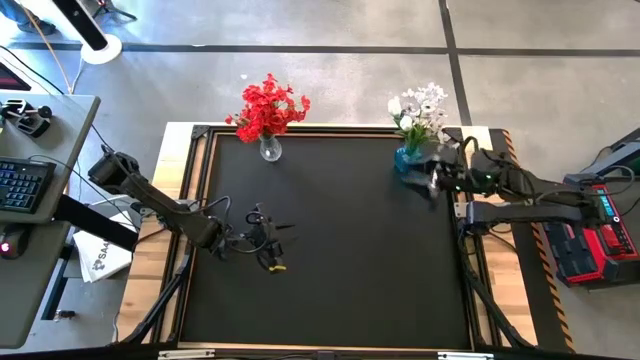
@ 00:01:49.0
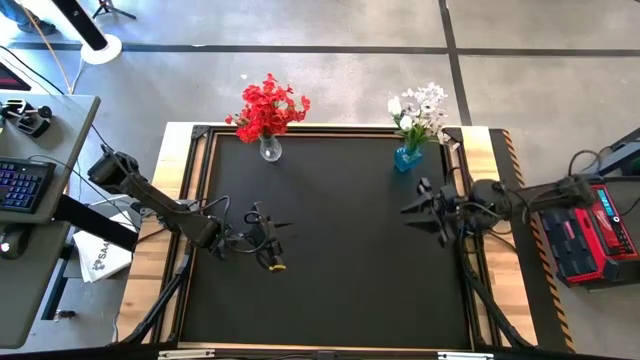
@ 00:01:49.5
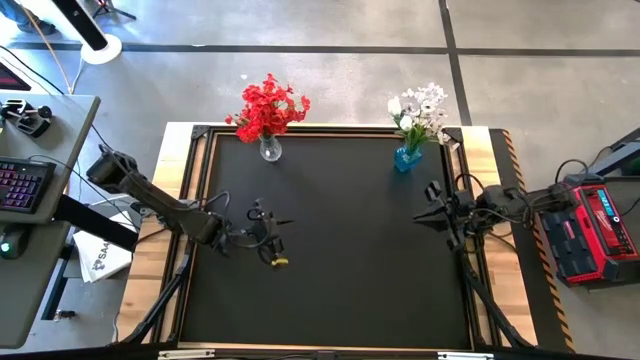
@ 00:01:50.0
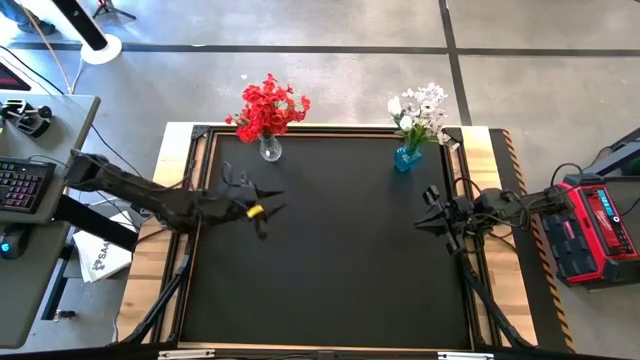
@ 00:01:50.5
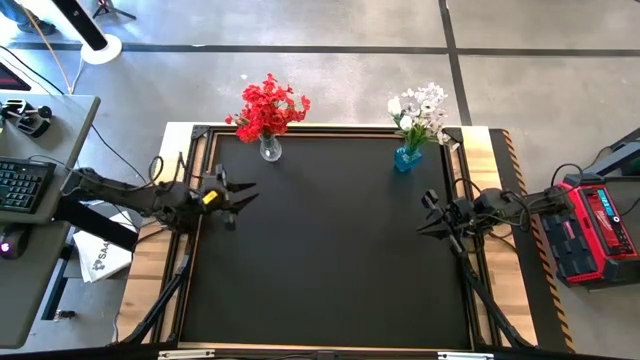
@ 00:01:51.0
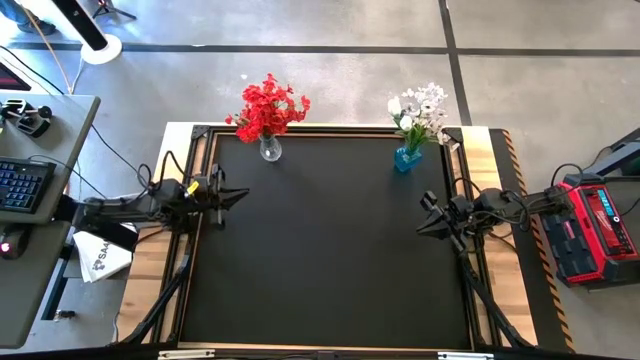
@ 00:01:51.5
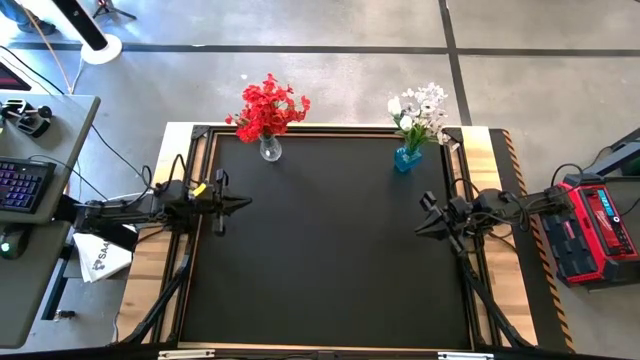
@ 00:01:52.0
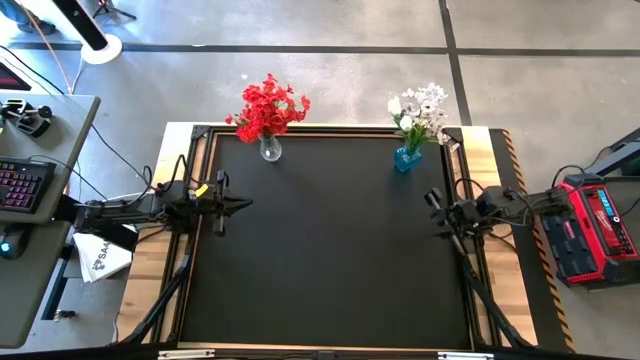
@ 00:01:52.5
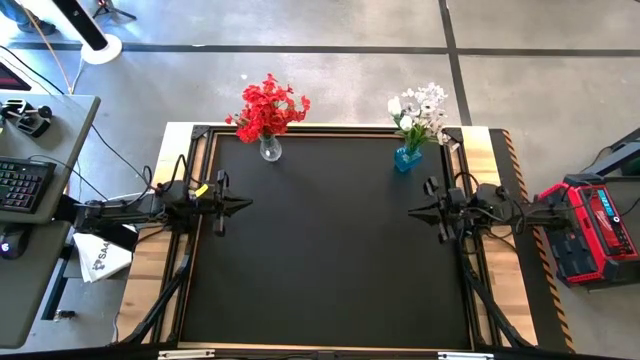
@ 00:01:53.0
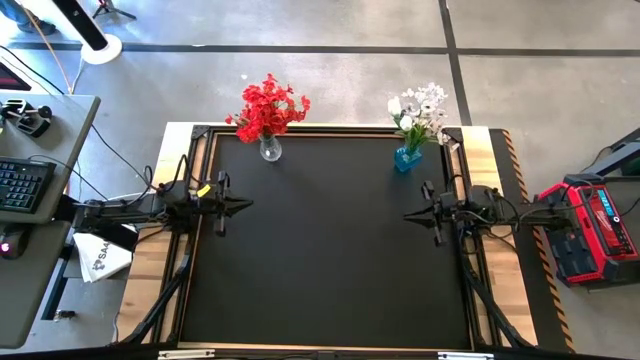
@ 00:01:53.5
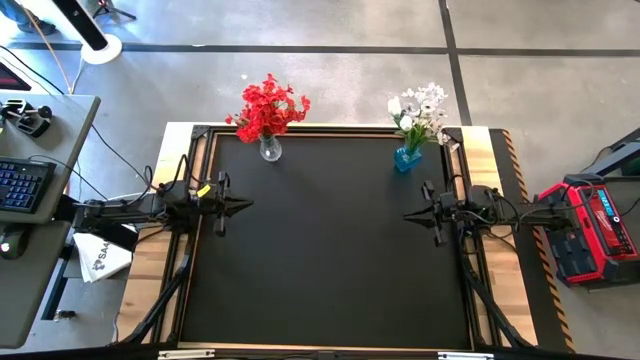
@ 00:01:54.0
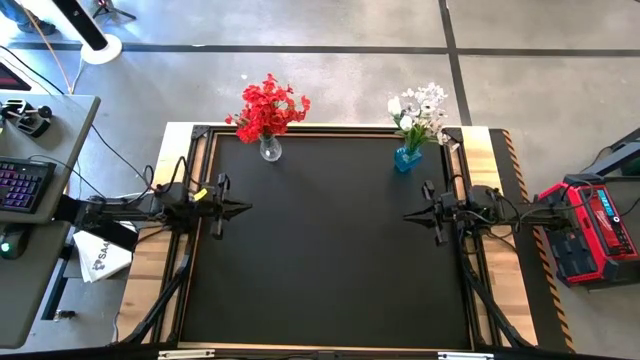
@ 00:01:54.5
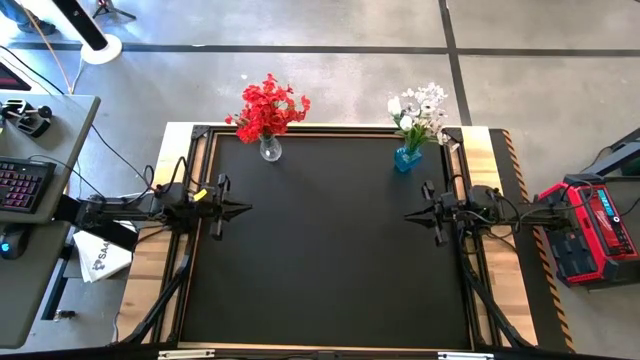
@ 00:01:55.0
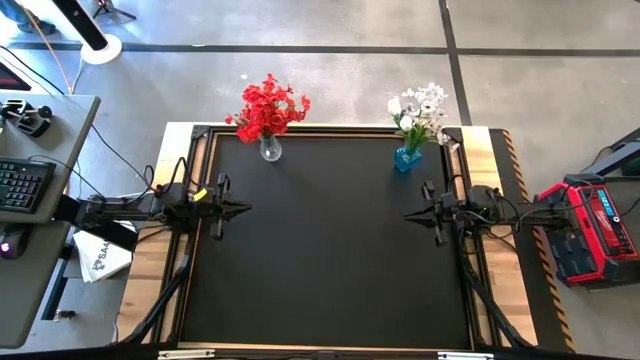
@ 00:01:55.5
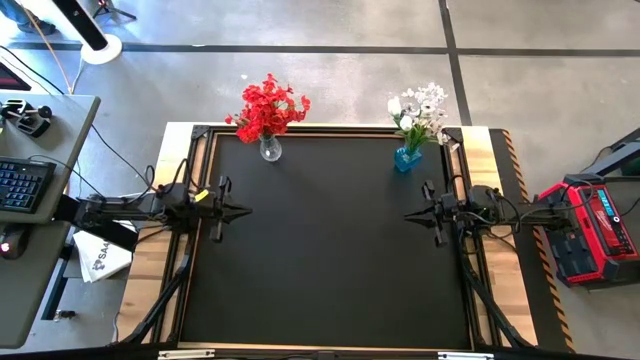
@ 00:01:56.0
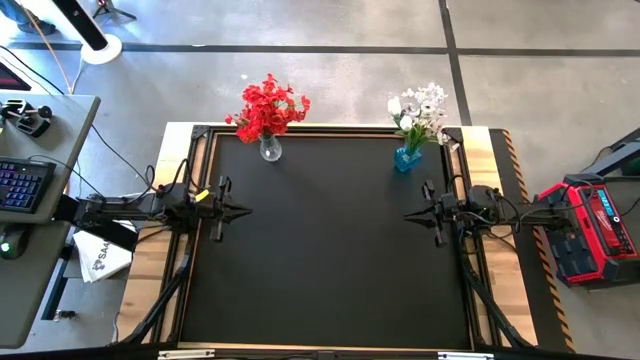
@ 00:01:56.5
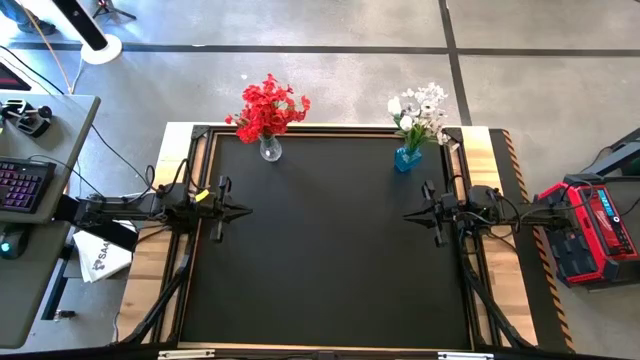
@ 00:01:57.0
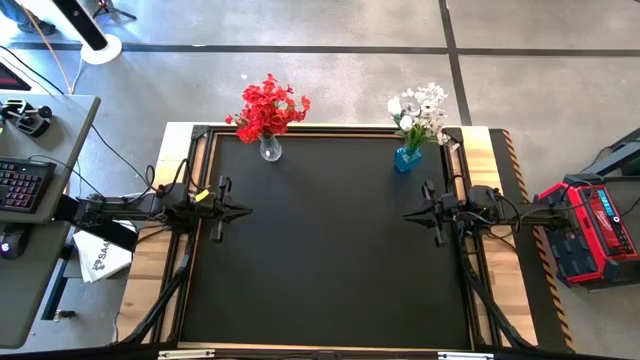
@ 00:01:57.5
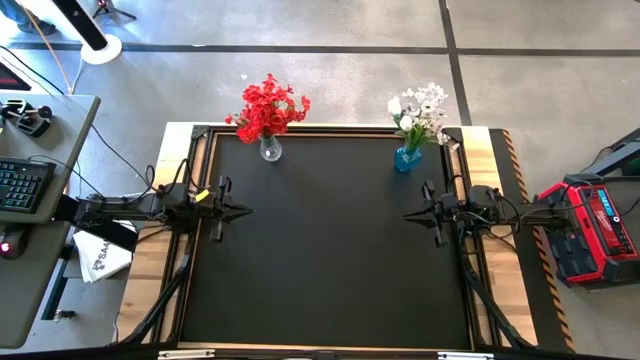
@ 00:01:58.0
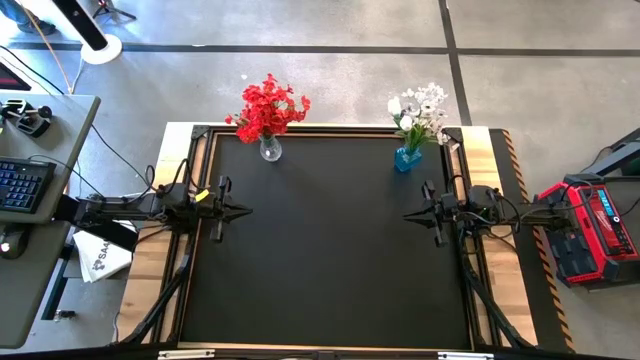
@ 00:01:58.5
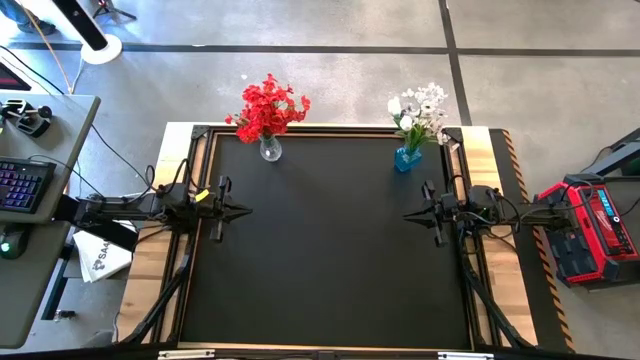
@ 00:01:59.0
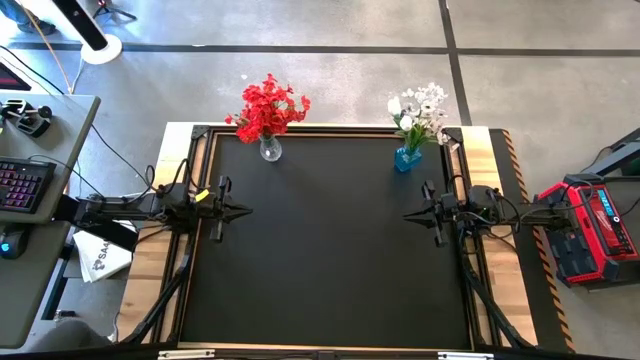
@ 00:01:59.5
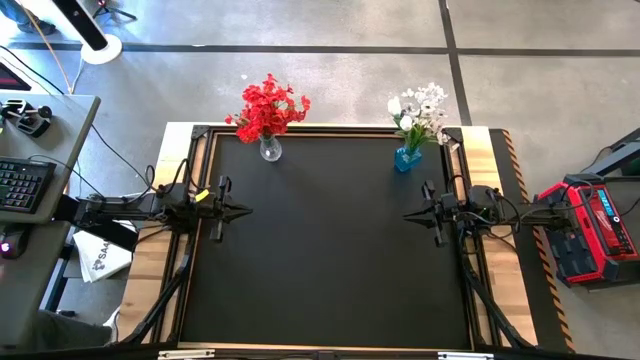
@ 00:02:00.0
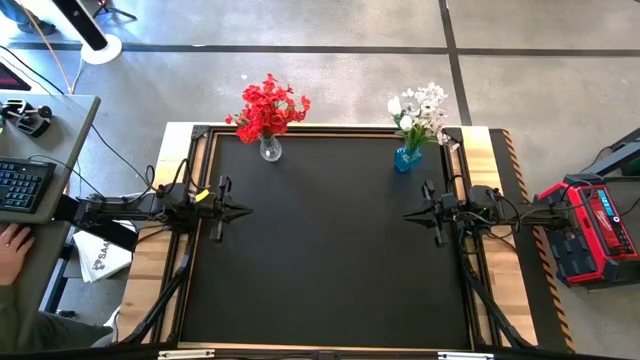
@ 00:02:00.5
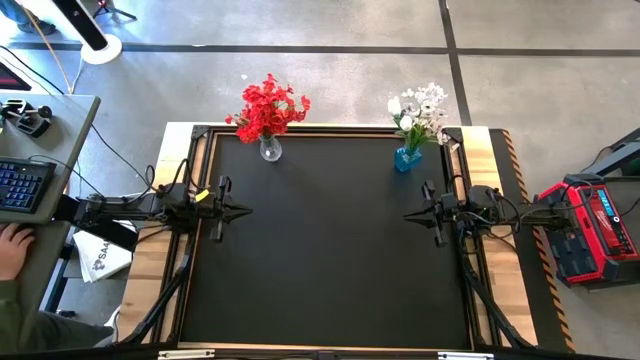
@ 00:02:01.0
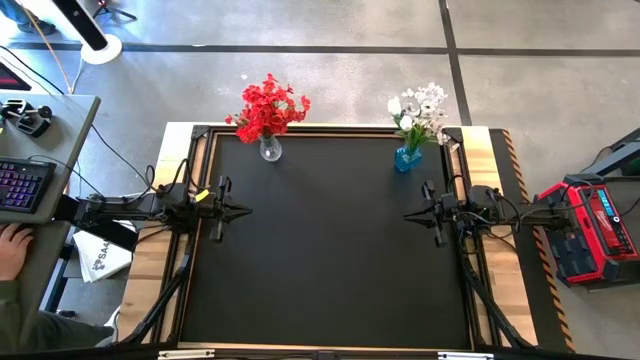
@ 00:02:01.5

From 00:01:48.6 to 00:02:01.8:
Task: Sort flowers into vase by color
Return to Home Position

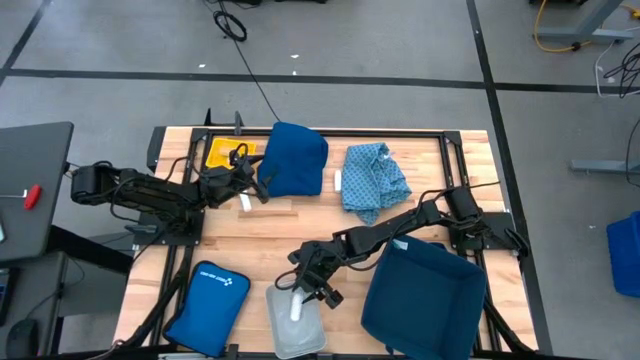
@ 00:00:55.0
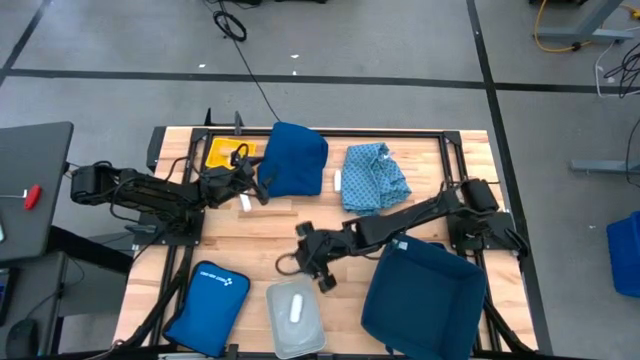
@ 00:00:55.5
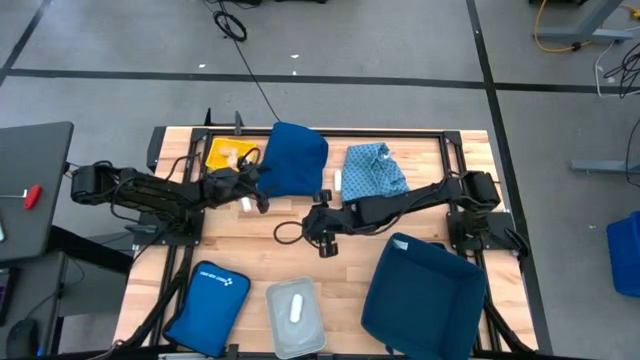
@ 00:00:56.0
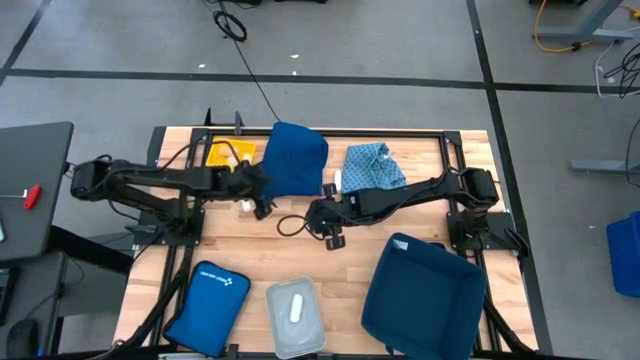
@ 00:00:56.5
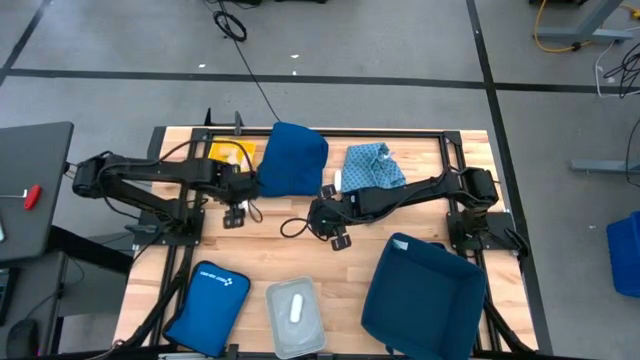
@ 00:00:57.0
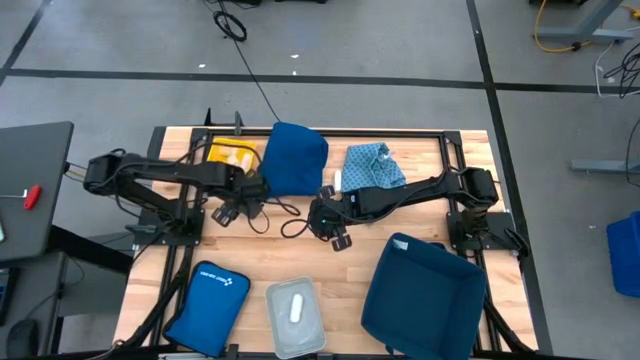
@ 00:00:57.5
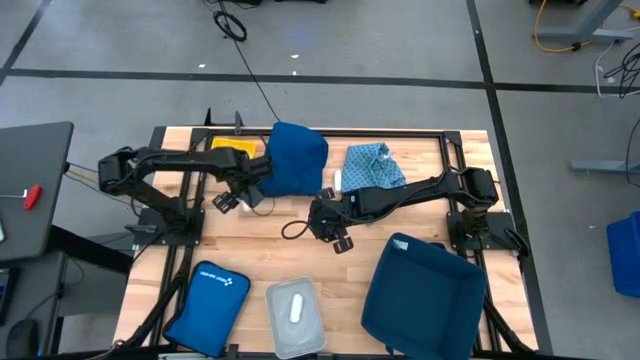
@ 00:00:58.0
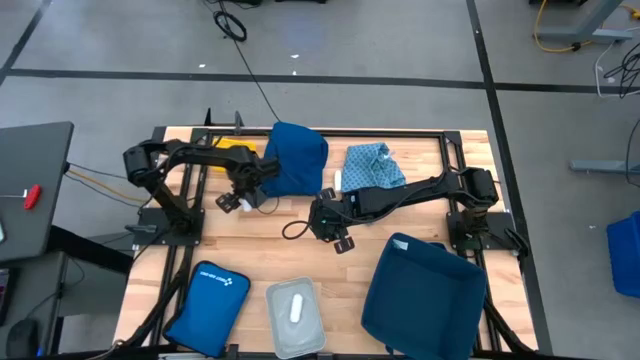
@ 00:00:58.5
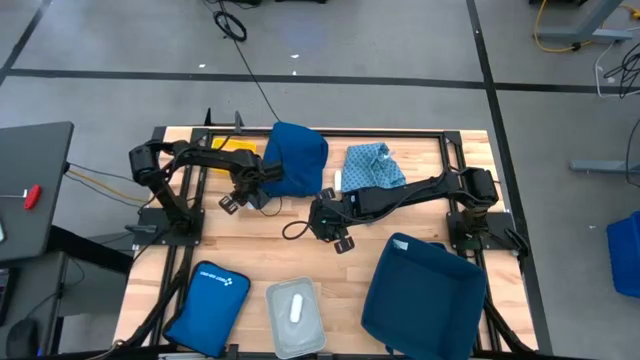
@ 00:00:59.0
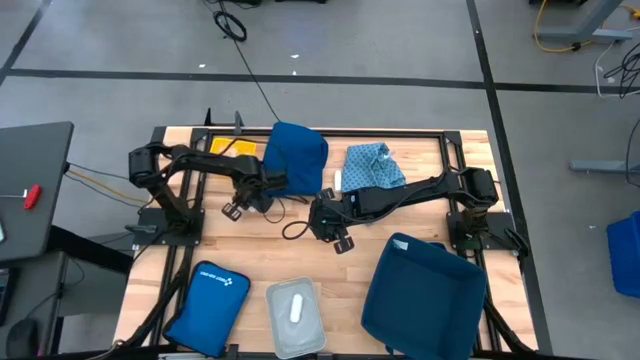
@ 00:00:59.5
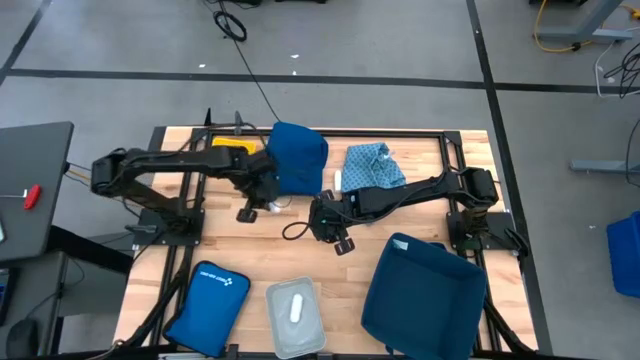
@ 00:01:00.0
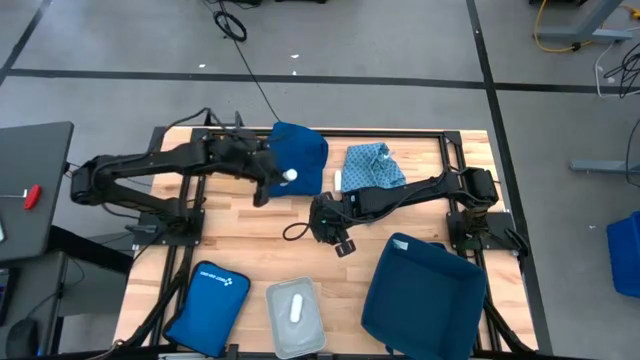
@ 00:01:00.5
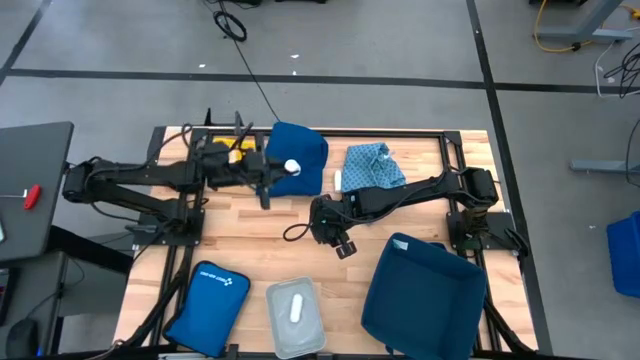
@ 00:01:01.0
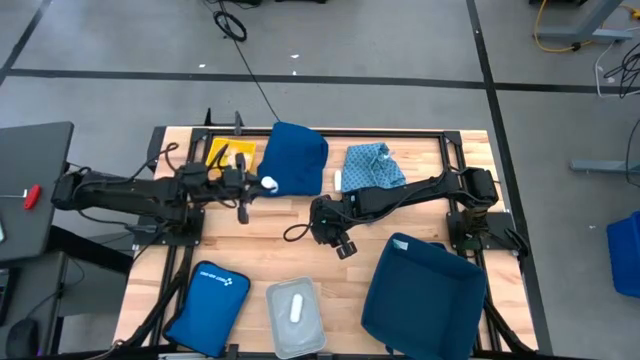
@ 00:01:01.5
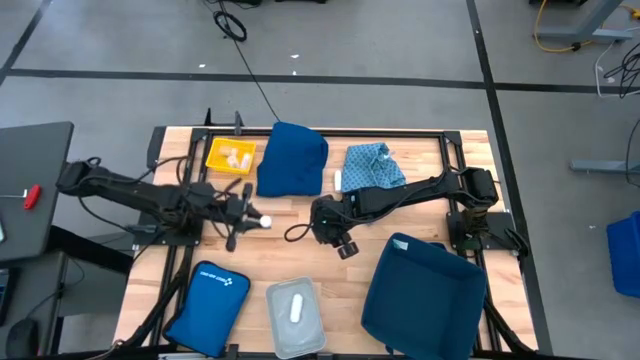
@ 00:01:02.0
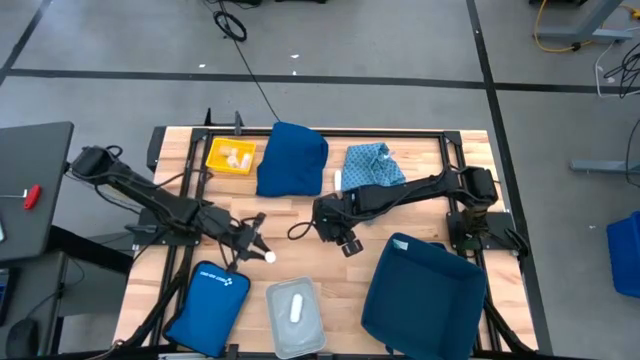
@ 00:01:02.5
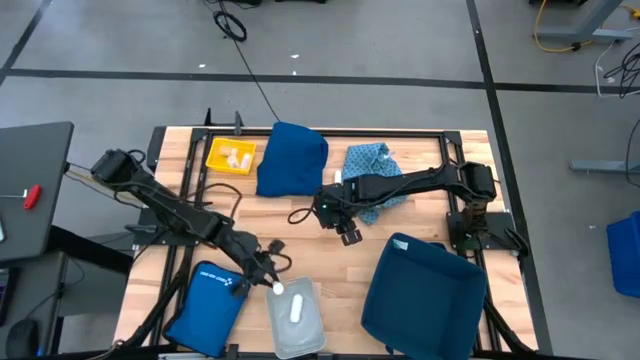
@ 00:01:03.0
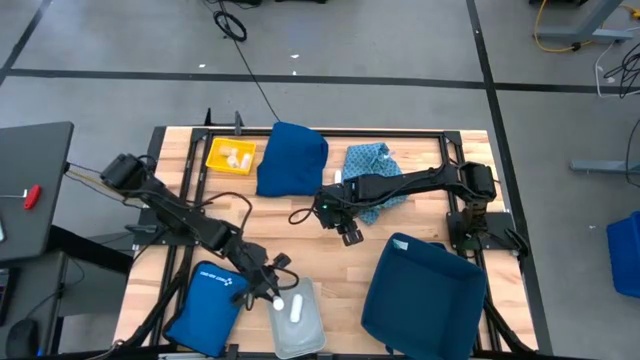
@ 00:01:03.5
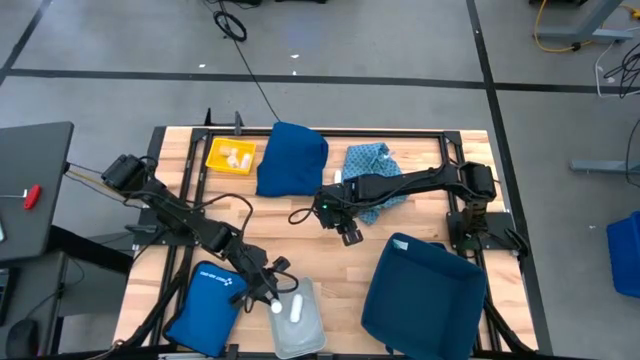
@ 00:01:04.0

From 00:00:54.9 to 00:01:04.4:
Task: Pick & place medical supplies in basket/bin
Put the left white bandage into the gray bin
